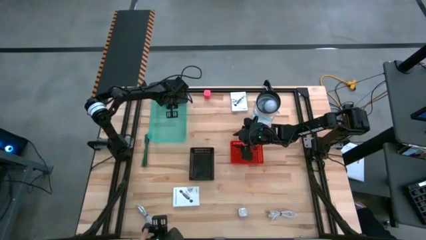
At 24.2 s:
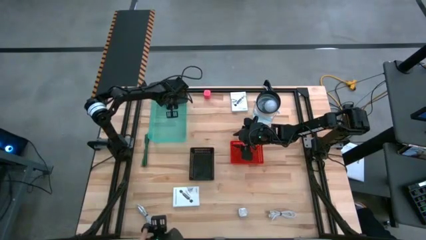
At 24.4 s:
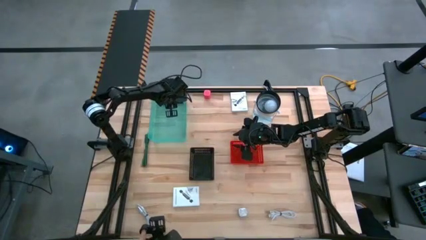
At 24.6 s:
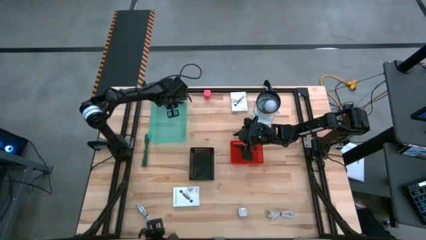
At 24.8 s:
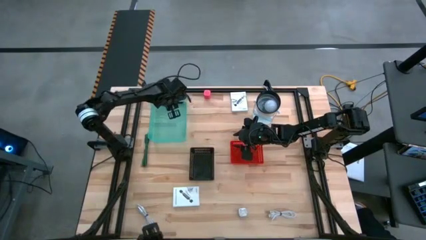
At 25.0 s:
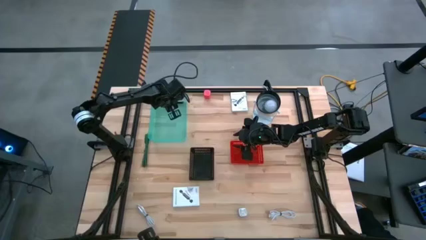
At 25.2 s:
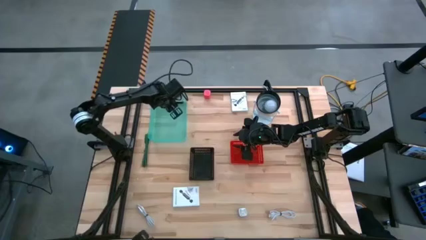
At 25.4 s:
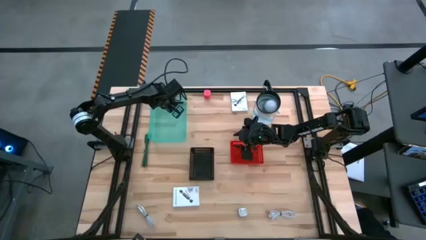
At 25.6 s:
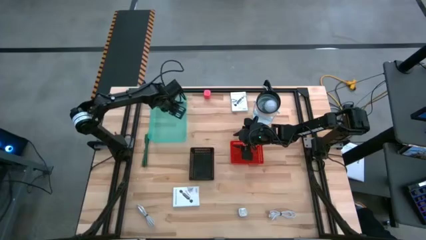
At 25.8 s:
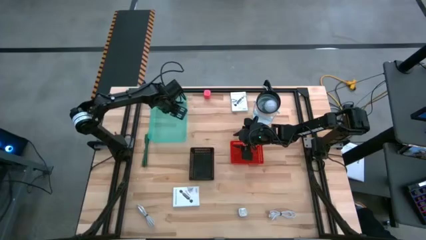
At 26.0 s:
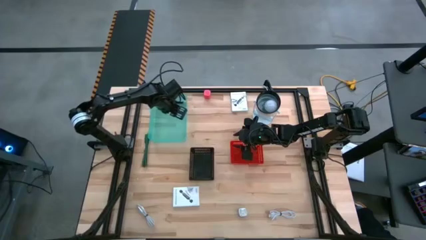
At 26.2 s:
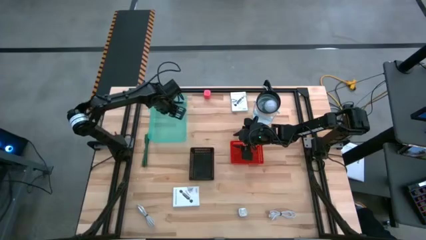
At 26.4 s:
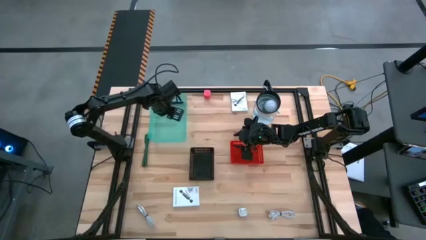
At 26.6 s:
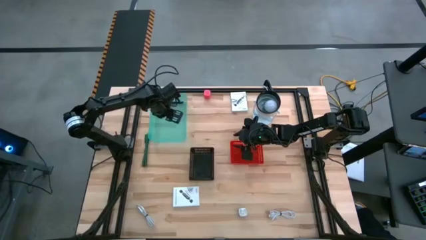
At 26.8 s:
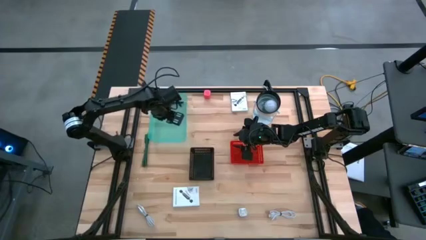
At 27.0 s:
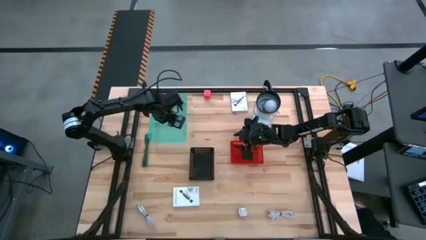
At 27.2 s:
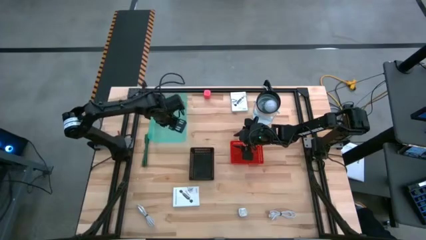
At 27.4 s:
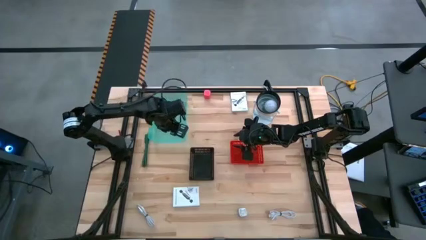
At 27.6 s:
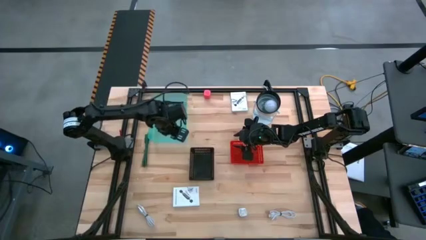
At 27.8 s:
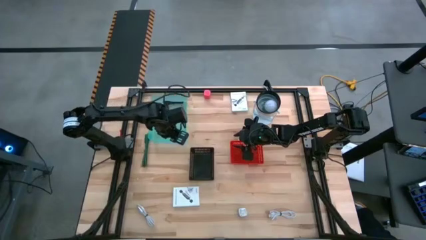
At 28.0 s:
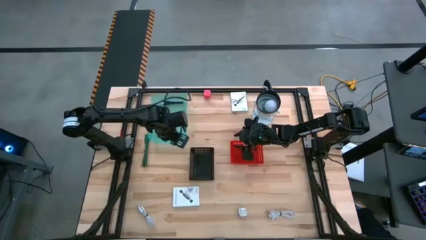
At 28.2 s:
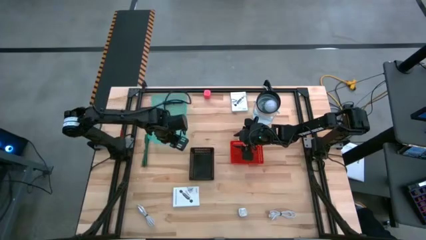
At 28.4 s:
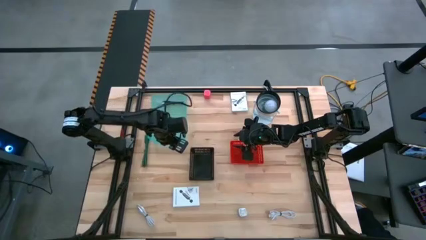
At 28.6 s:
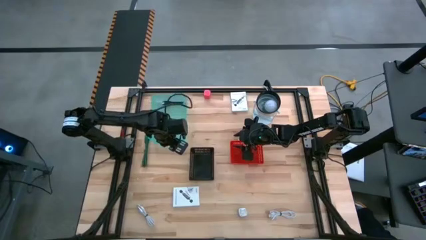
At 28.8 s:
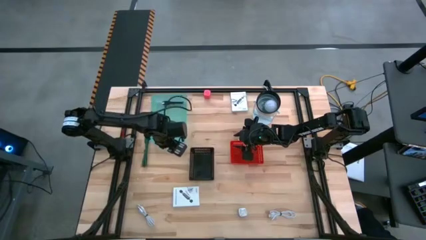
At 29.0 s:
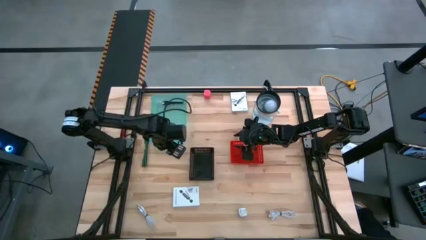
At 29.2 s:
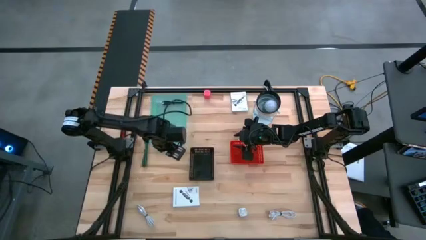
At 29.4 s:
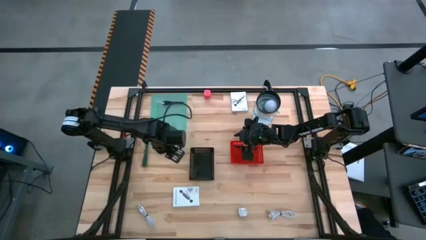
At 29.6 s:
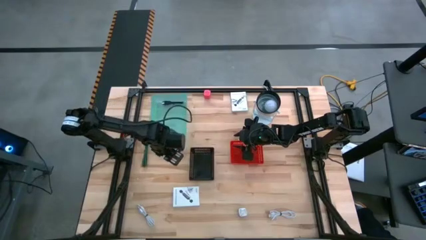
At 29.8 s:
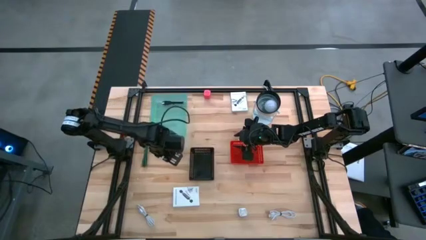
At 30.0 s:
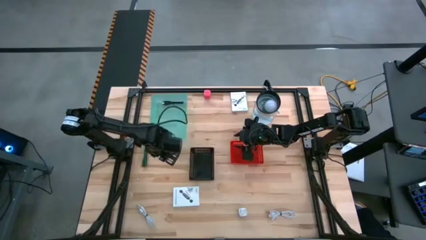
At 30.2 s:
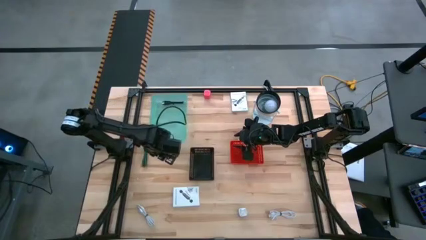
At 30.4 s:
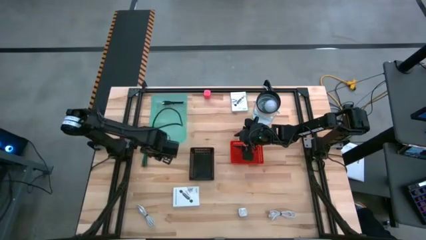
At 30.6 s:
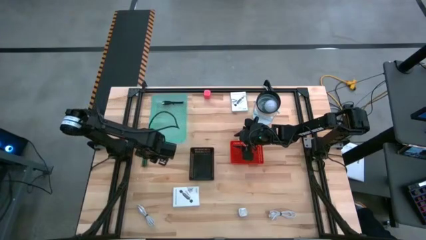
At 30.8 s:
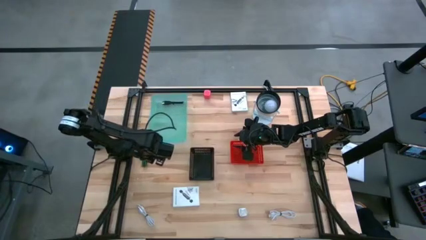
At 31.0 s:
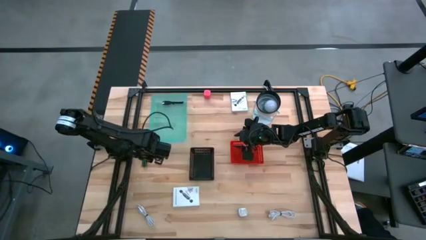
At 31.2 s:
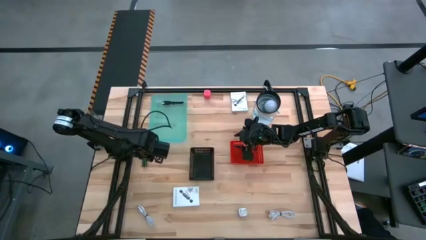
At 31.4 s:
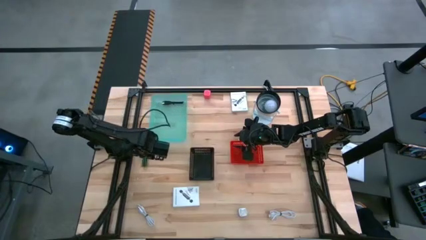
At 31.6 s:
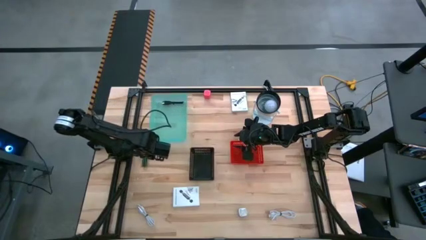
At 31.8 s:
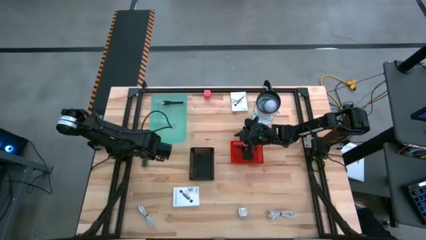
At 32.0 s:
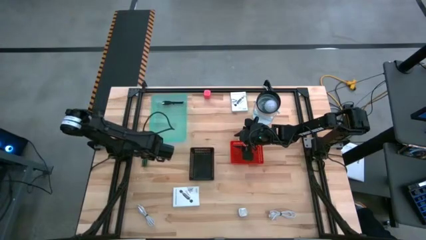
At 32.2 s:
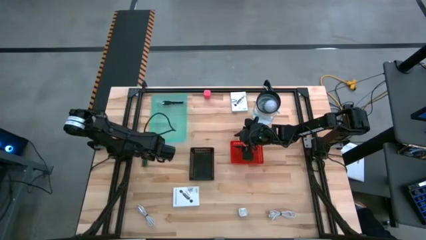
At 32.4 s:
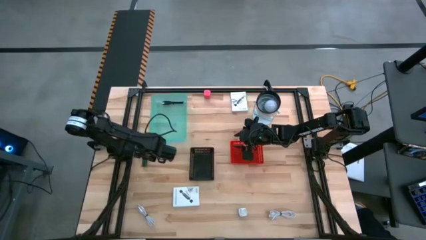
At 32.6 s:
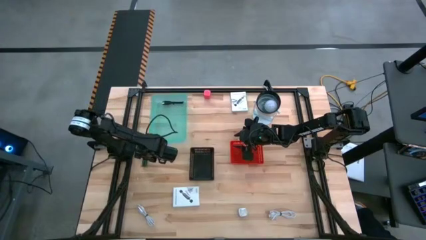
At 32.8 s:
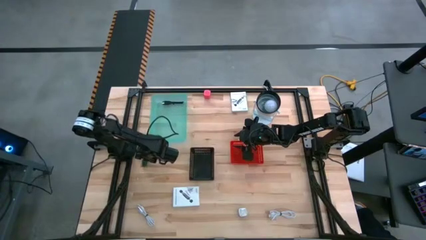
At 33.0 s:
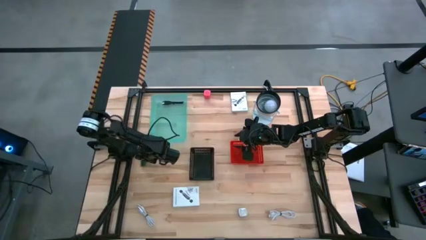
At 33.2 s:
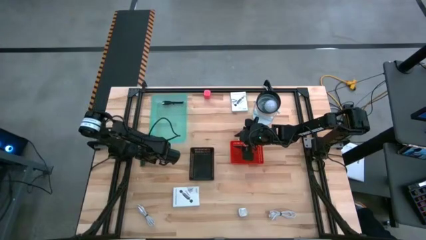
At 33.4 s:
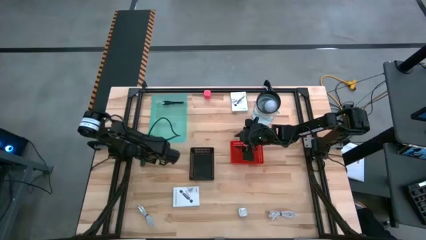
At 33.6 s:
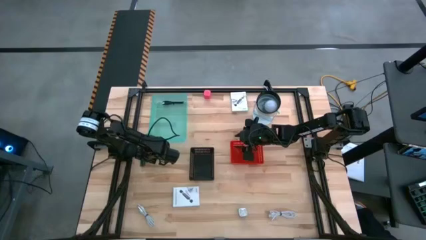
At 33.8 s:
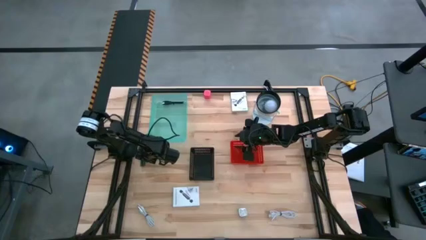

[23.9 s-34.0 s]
Task: Pick and place items into bin
Put the green charger cable into the blue bin

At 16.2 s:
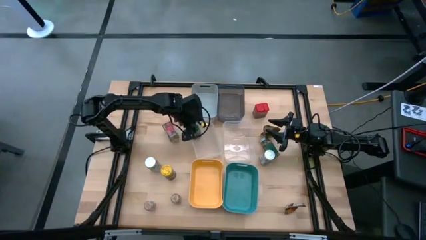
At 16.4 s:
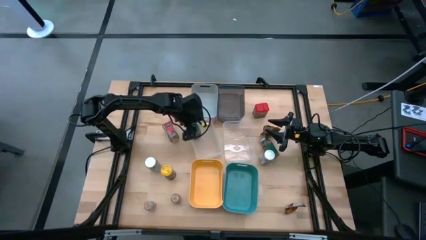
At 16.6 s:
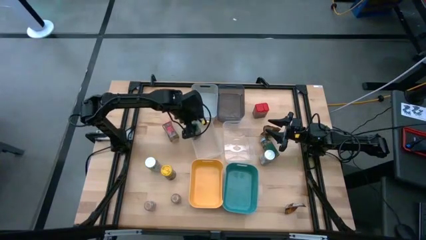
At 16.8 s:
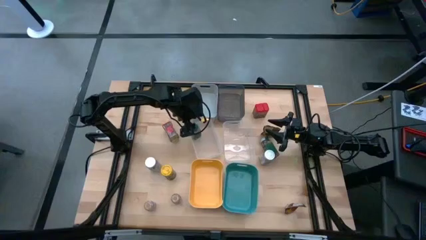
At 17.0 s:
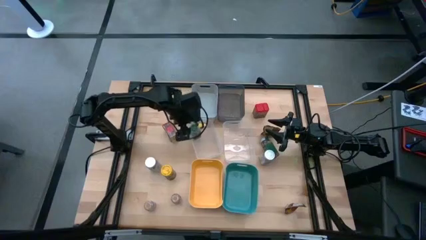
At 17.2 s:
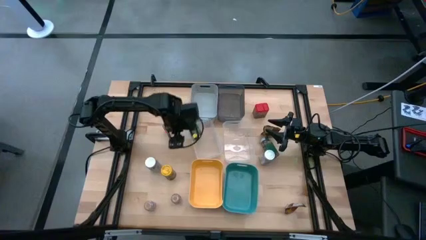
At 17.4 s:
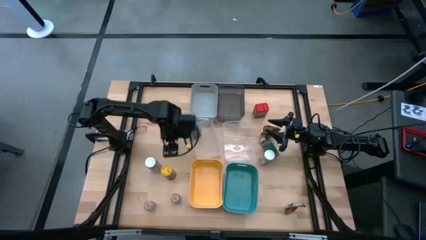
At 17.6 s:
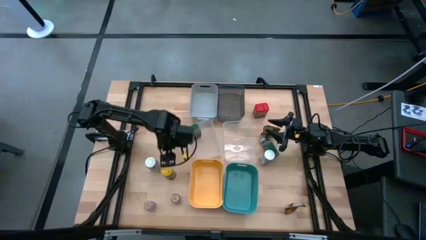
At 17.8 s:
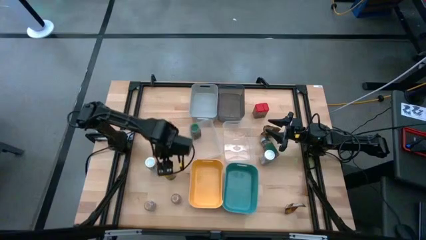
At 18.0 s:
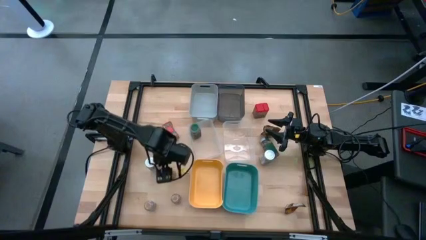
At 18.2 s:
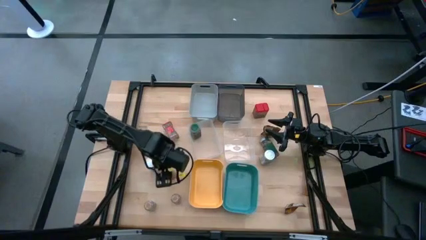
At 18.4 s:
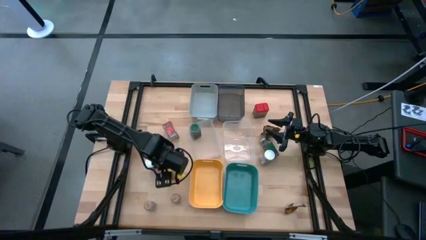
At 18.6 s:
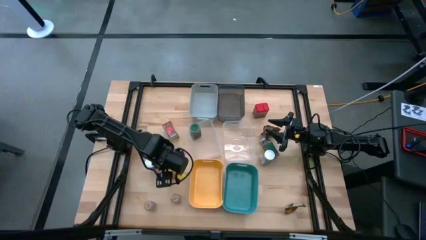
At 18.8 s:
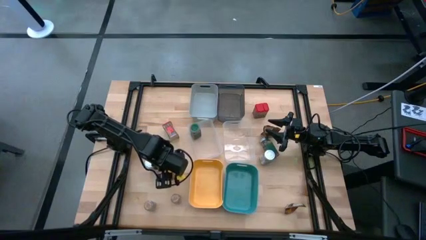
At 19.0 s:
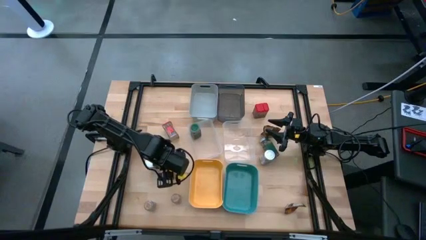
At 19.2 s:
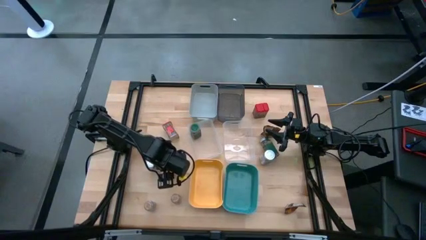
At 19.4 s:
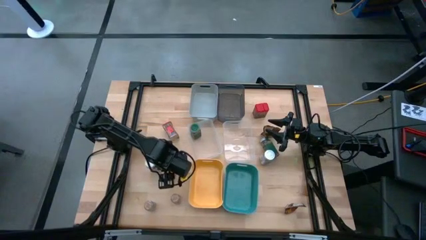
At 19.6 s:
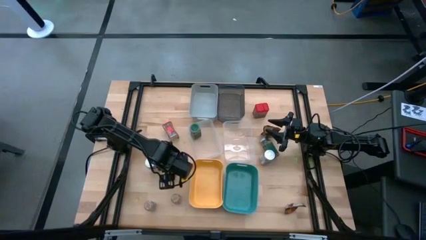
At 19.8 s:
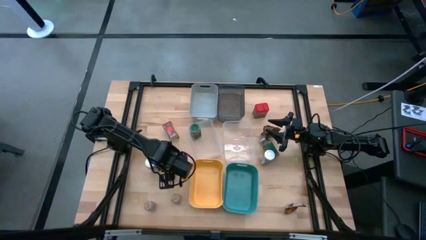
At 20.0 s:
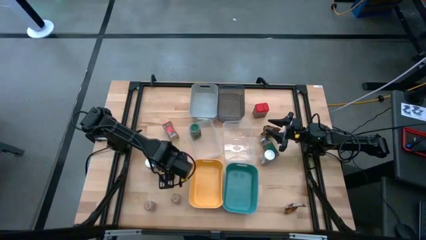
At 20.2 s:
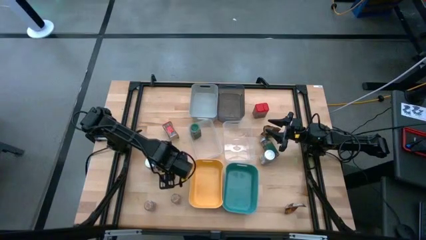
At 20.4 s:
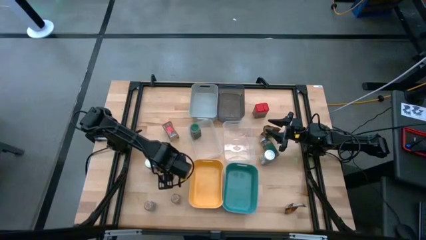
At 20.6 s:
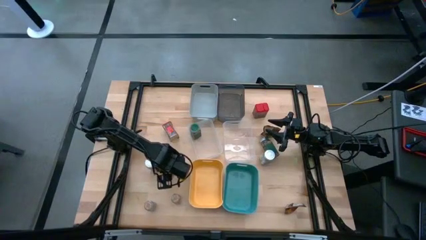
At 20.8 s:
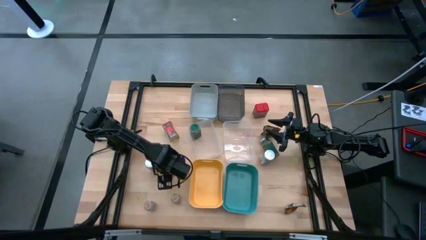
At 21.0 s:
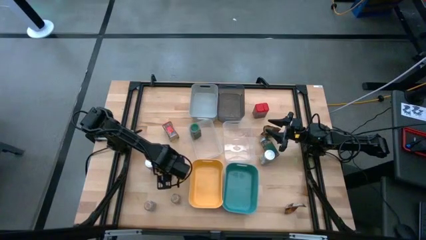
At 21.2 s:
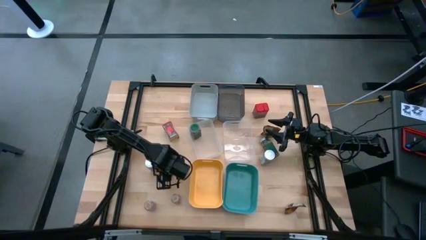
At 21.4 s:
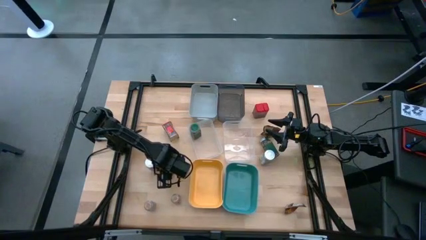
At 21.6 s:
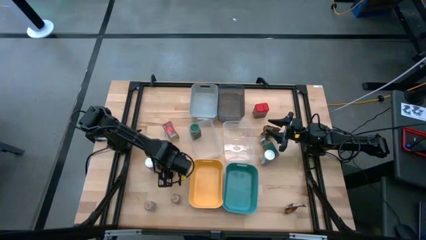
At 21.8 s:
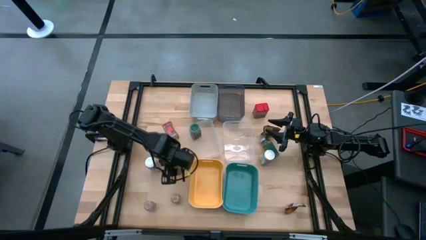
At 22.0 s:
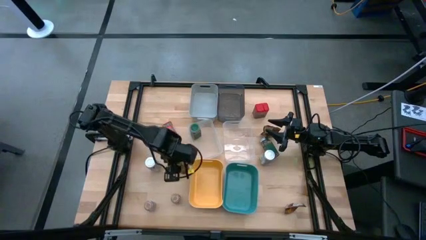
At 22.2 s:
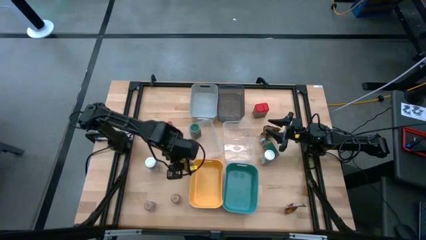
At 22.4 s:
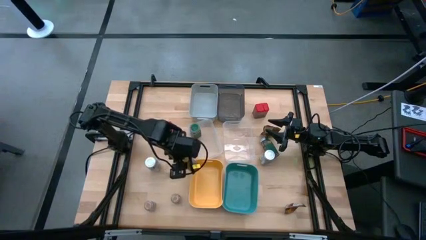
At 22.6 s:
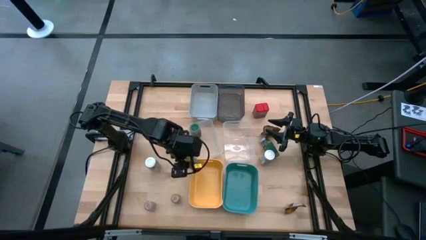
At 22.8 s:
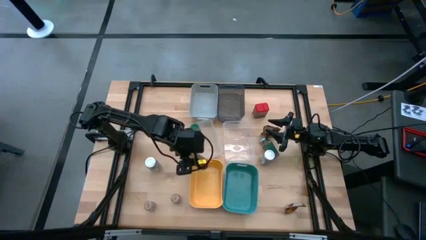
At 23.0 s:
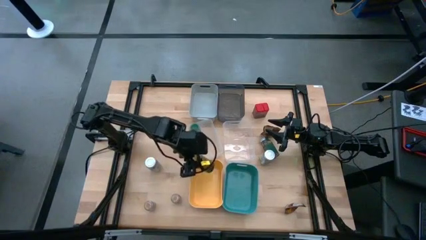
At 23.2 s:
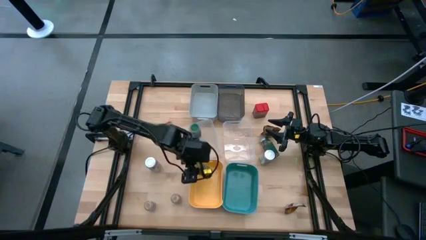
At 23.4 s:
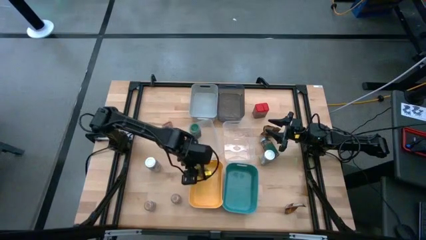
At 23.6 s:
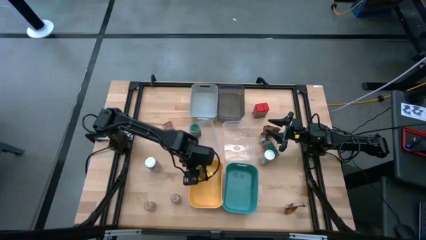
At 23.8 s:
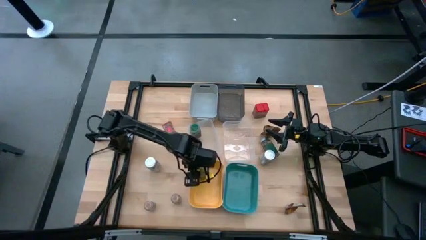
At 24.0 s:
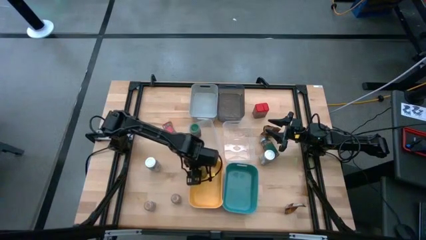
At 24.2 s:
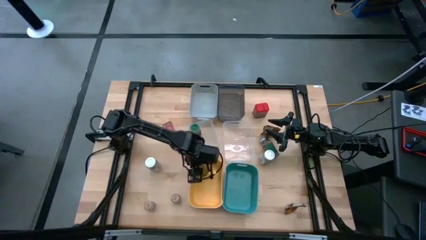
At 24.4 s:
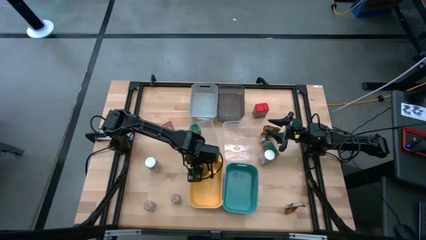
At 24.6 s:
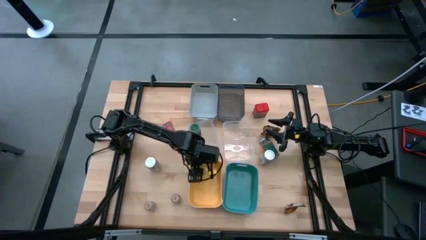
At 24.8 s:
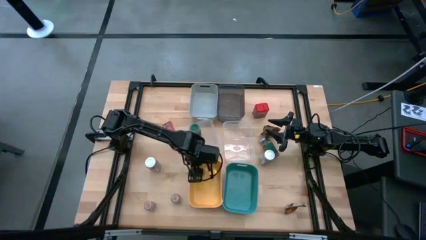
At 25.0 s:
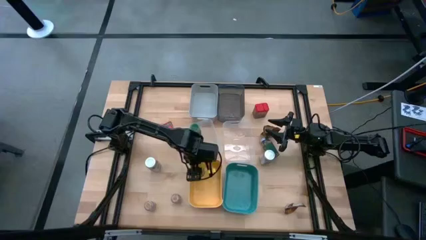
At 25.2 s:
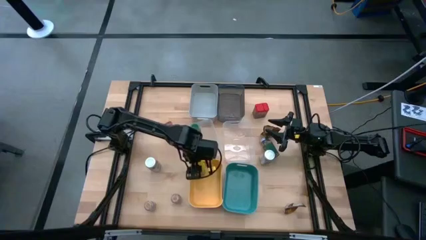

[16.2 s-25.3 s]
Task: Sort spices by type
Put the yellow seasoning bottle into the yellow bin
